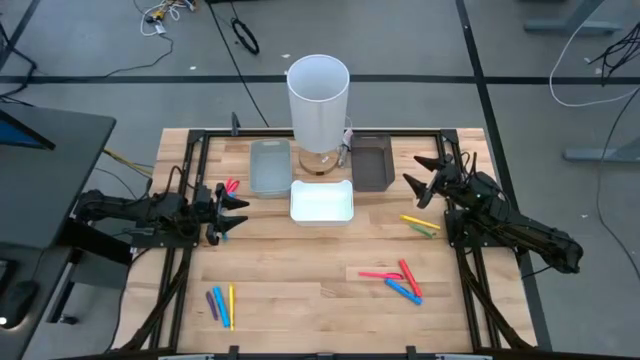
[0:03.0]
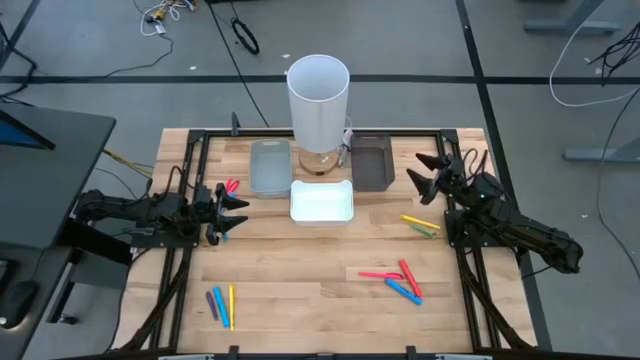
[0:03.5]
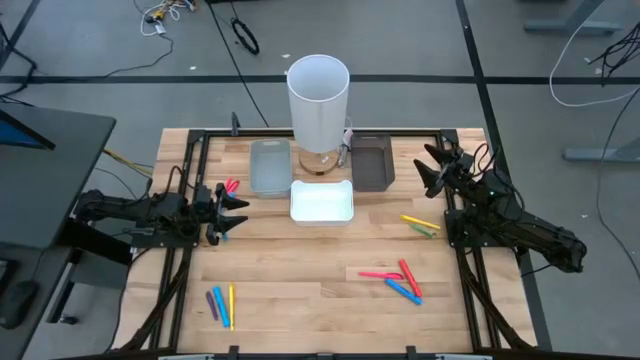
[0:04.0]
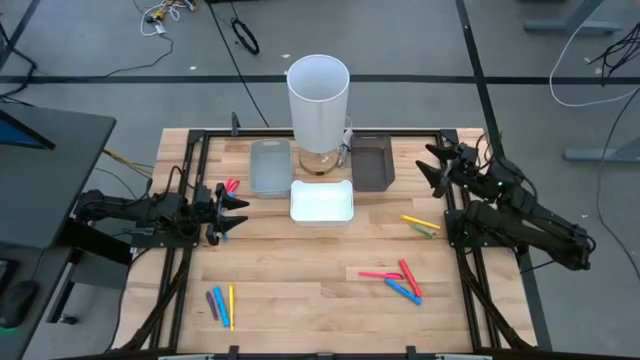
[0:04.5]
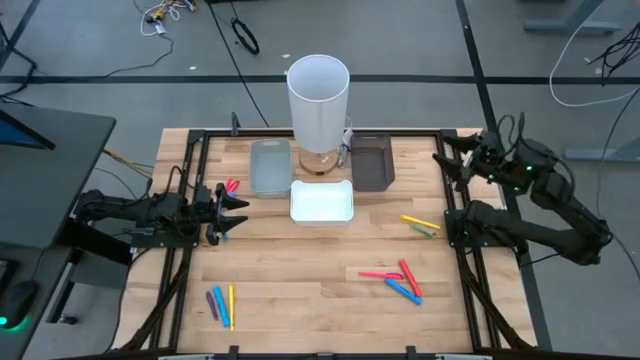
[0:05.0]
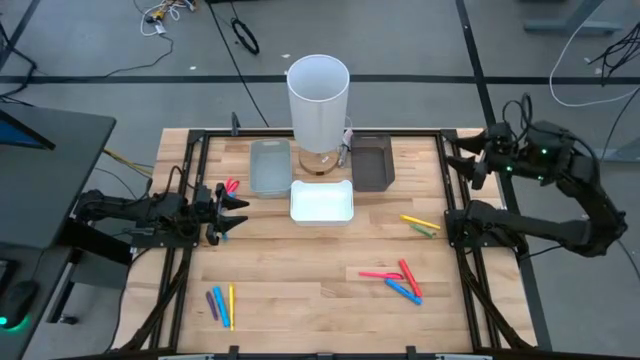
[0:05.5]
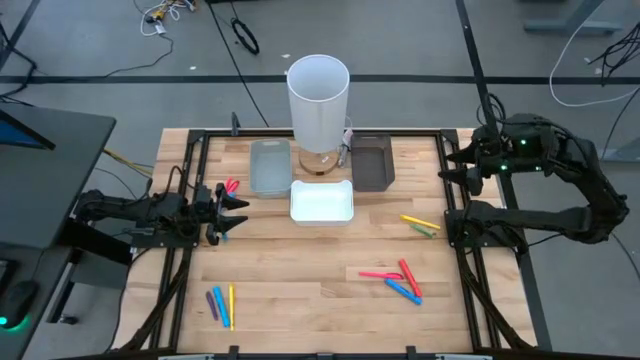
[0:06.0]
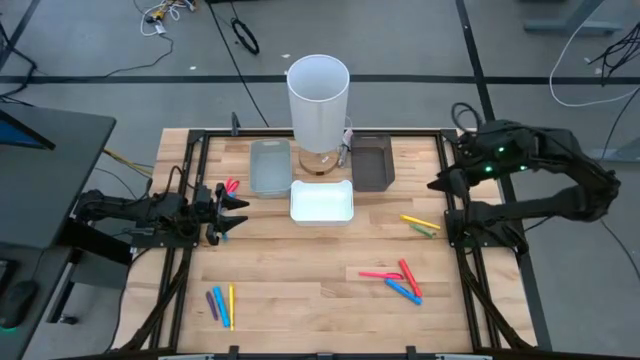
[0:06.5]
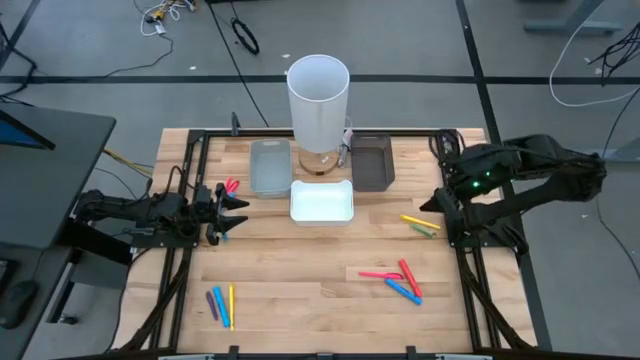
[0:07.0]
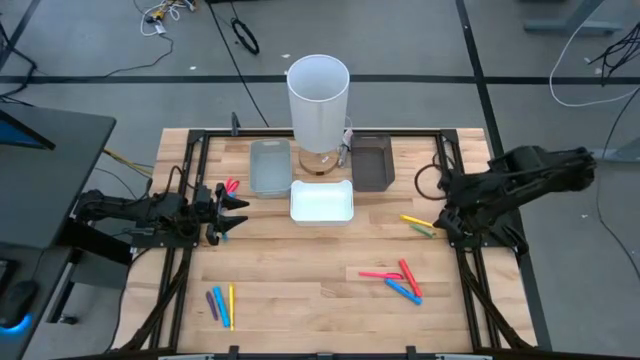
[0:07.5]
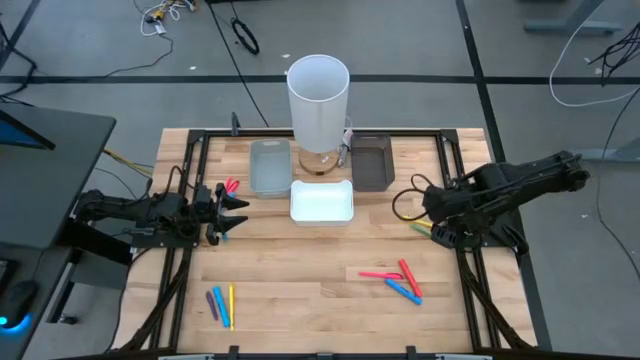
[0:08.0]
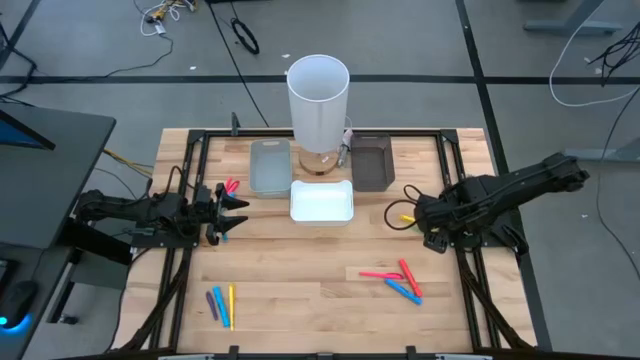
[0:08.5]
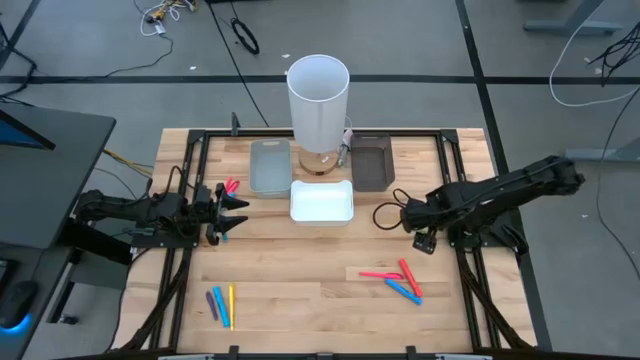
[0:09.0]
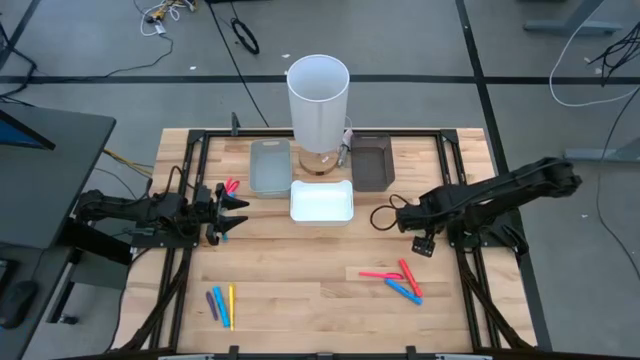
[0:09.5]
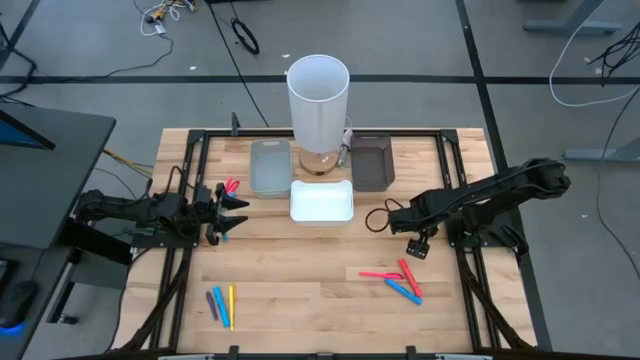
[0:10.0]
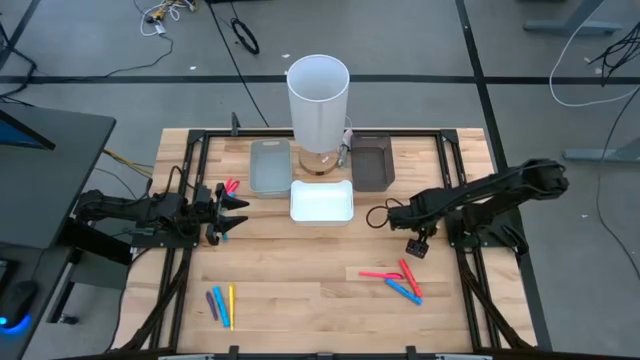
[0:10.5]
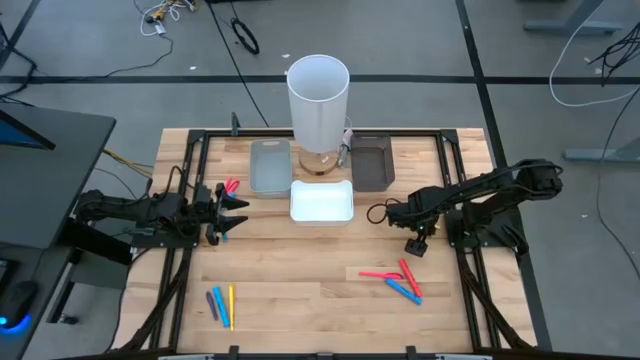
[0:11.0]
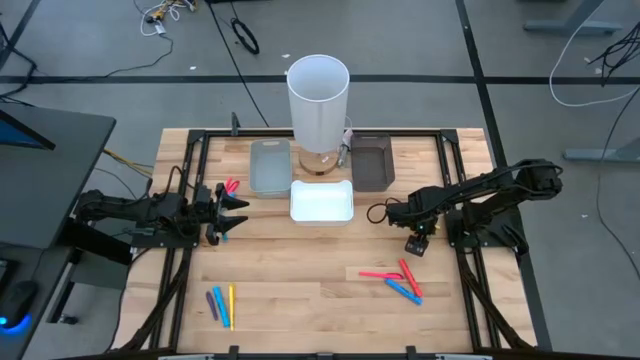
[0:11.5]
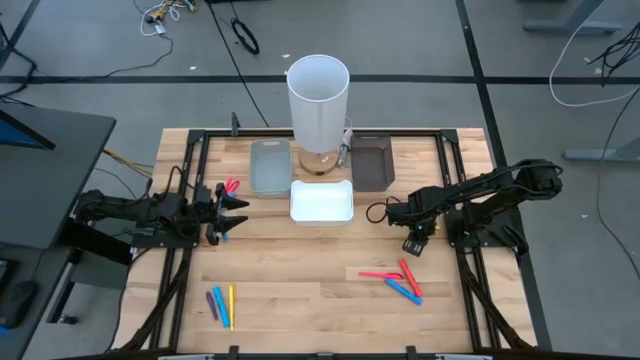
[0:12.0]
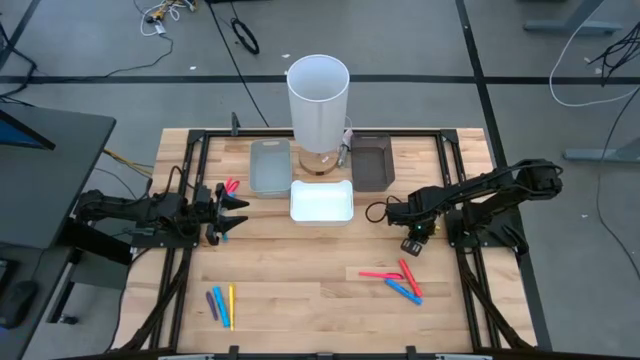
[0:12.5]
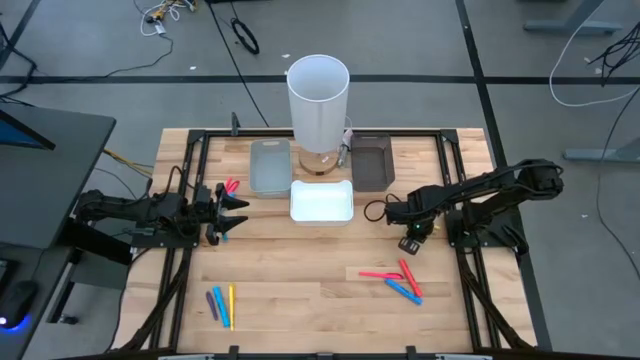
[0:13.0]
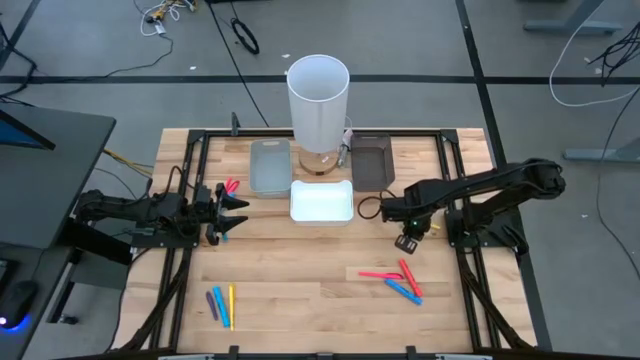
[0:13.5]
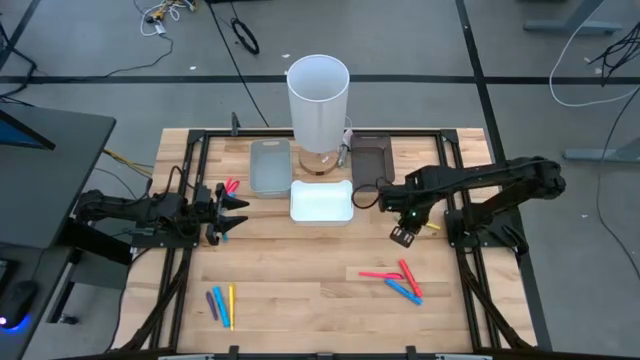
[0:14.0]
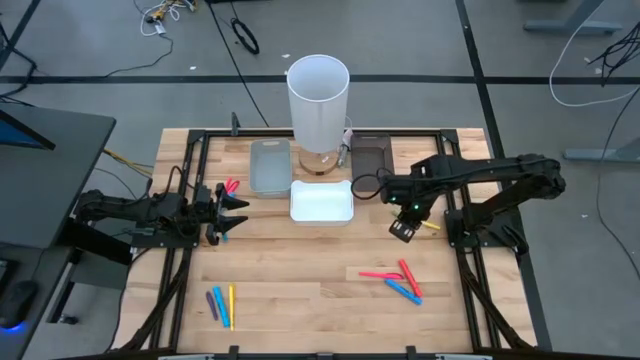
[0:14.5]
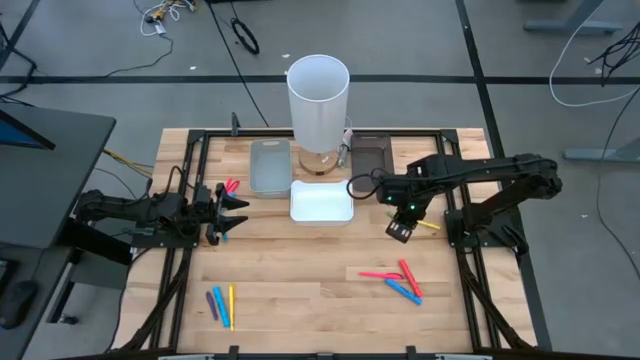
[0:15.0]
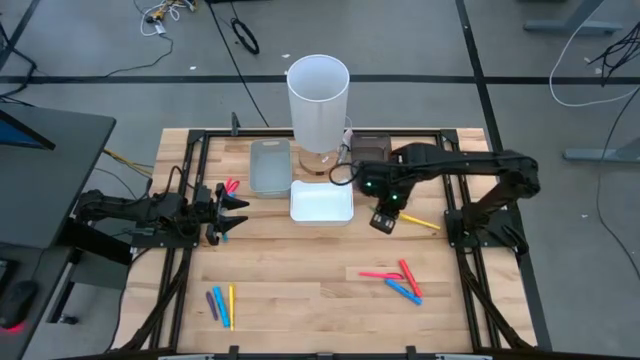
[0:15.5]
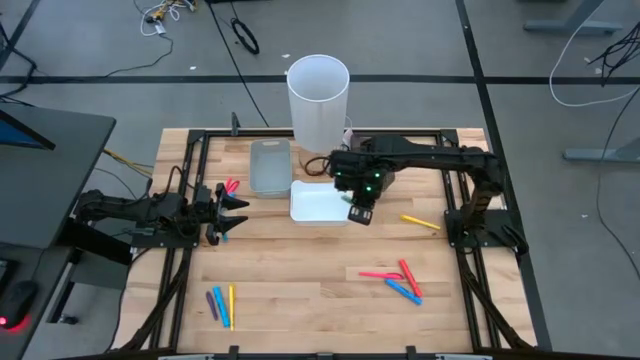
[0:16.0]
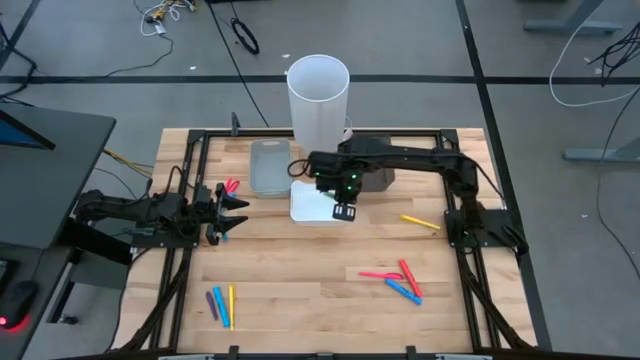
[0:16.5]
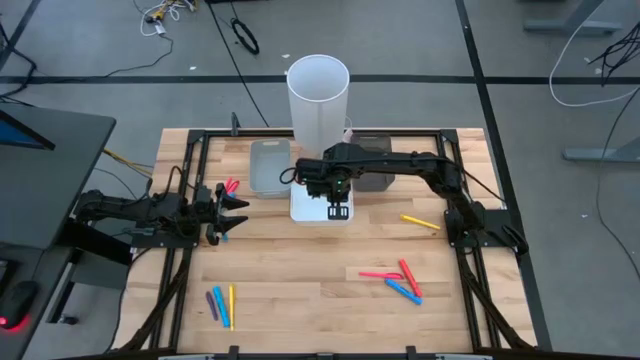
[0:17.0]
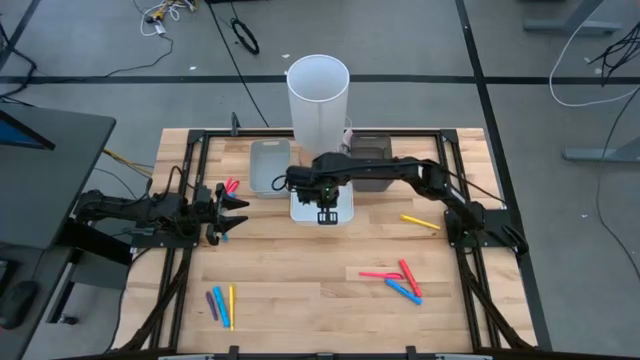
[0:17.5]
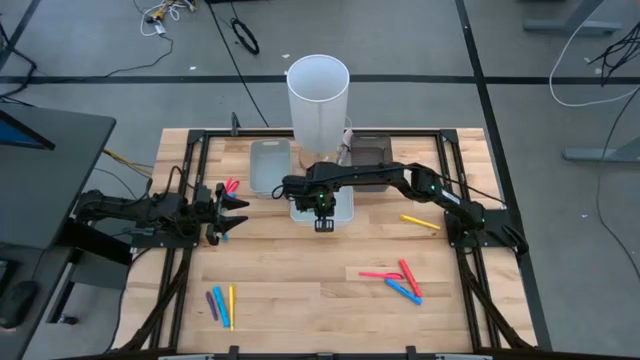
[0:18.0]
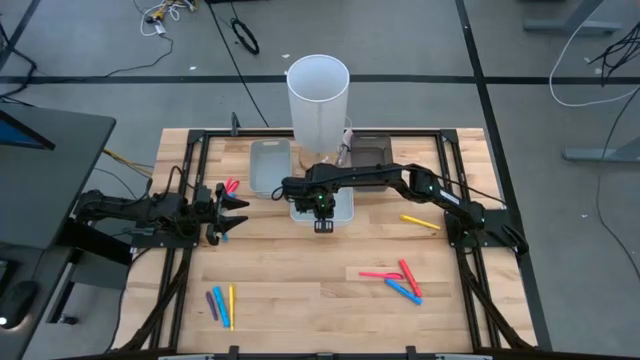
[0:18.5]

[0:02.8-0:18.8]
Task: Pick & Place Markers
Put the green pen into the white bin

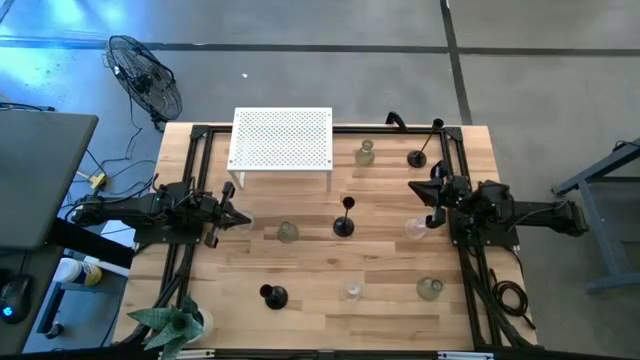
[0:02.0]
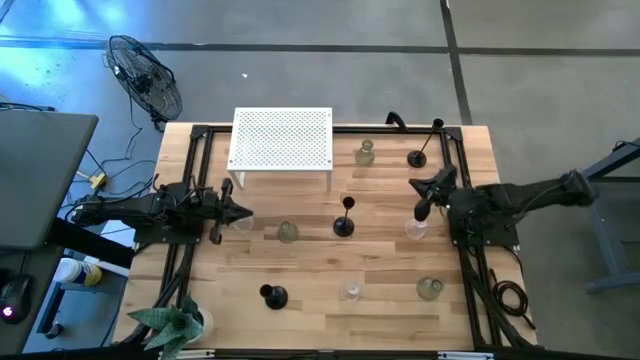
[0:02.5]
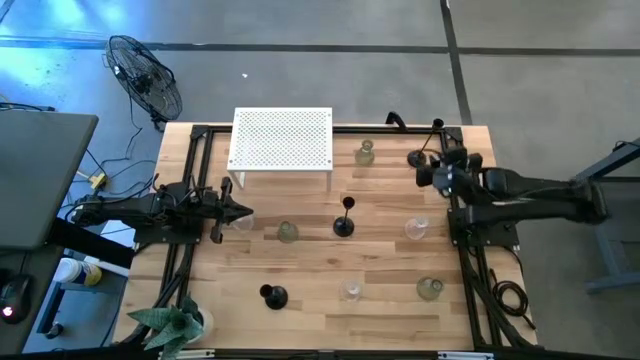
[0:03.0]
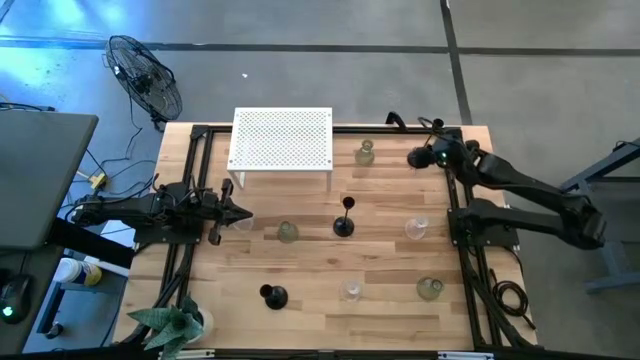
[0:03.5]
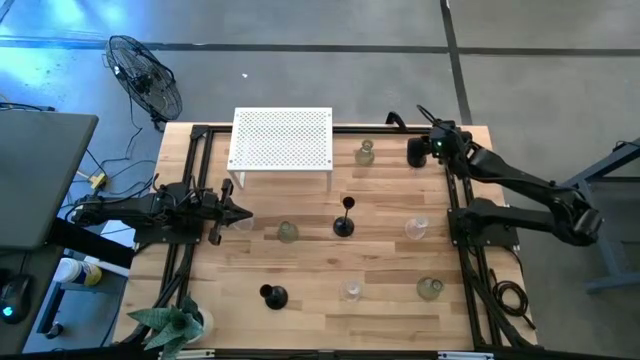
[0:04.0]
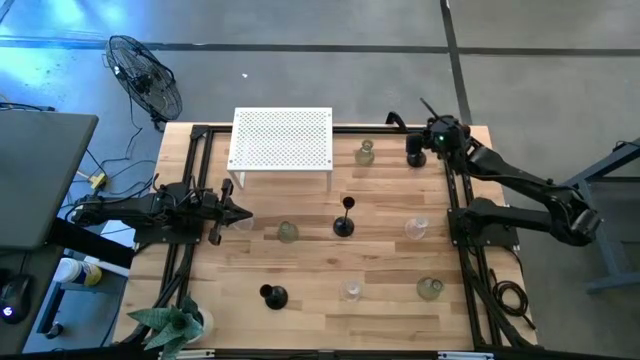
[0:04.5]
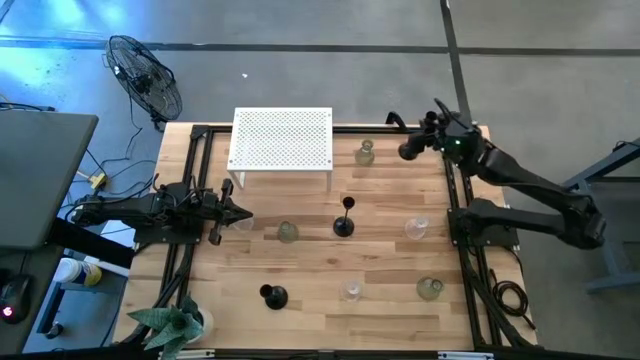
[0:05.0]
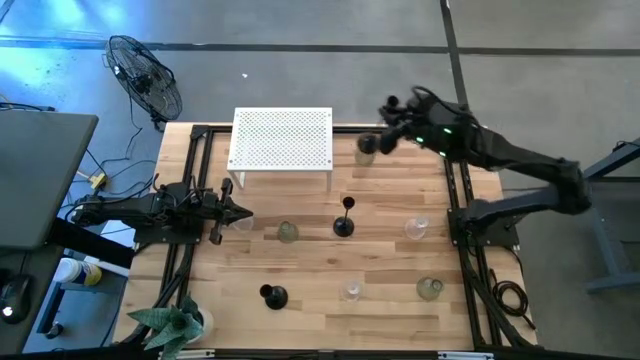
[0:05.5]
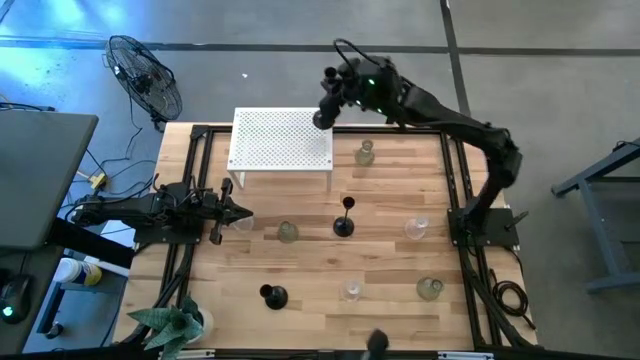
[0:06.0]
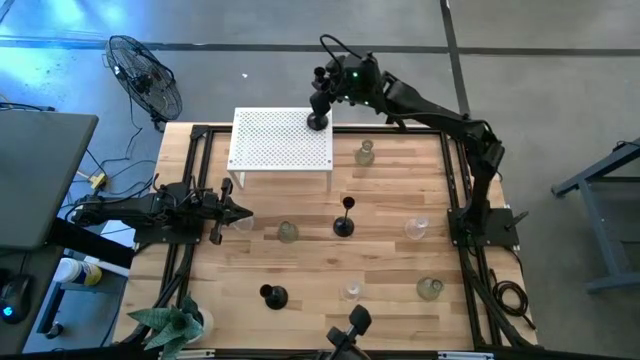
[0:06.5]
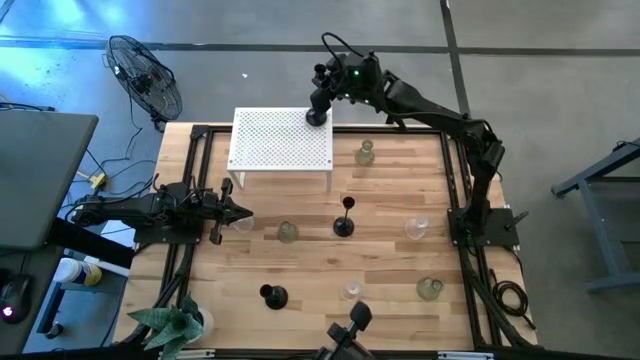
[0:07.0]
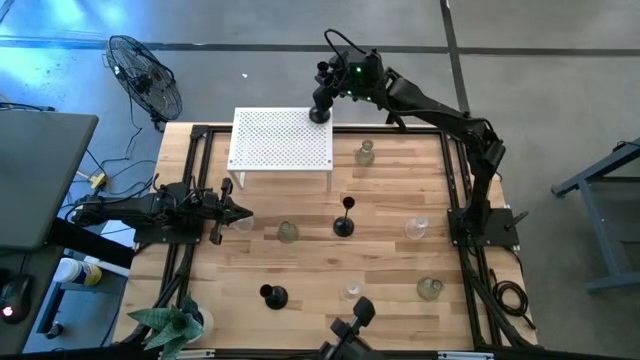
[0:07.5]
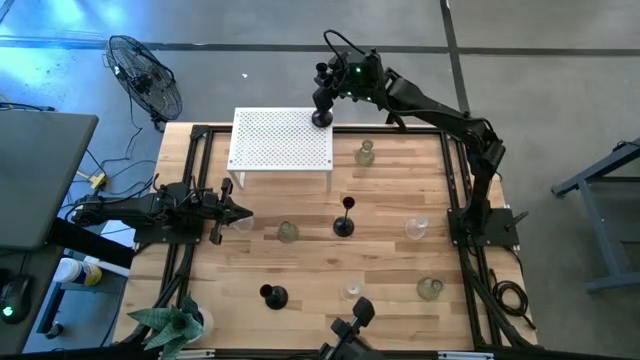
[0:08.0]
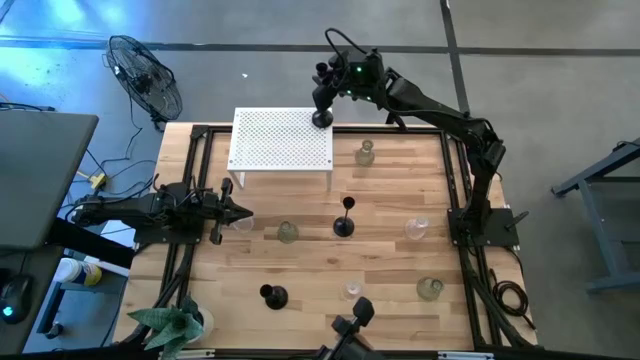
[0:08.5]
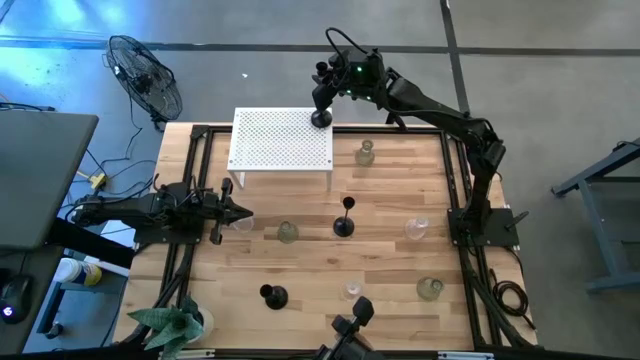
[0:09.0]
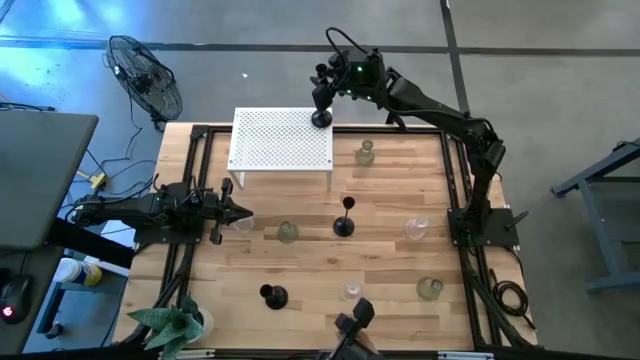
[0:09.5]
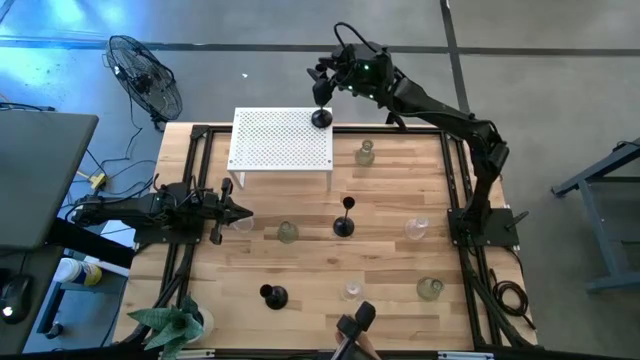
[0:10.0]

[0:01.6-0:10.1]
Task: Pick & Place candle stick holders
Put the top black candle holder on the shelf
